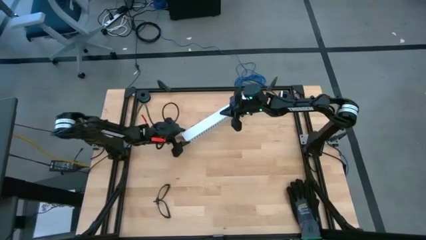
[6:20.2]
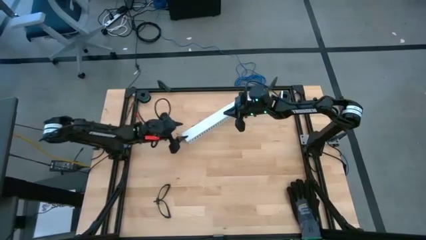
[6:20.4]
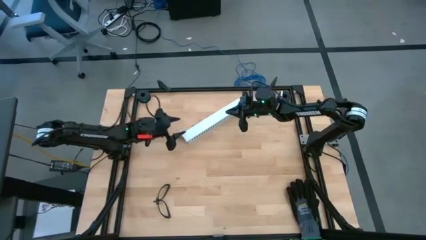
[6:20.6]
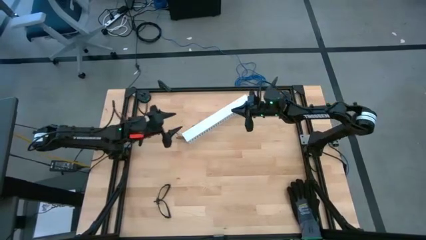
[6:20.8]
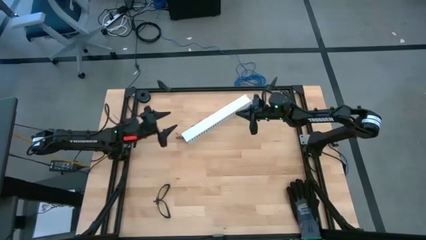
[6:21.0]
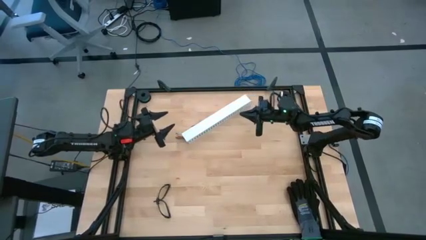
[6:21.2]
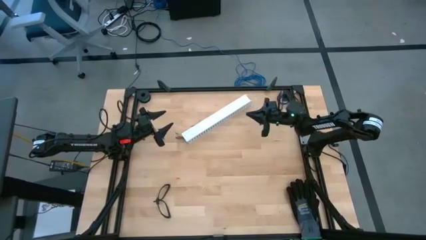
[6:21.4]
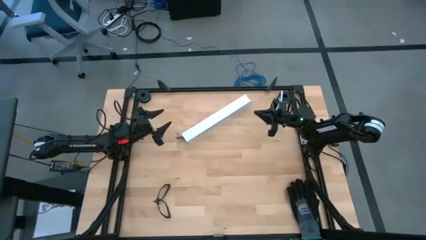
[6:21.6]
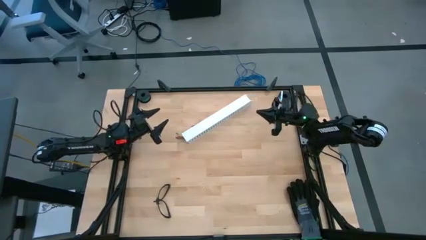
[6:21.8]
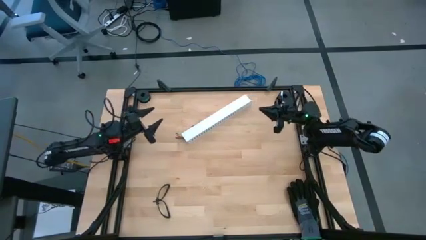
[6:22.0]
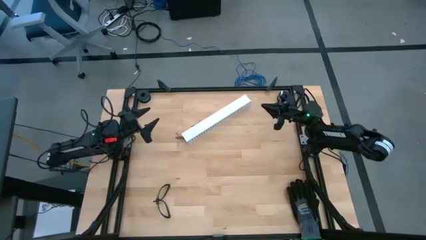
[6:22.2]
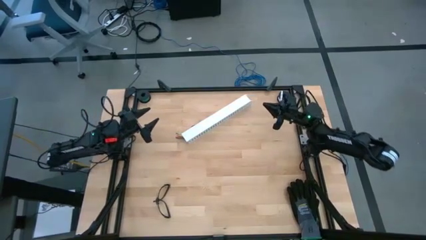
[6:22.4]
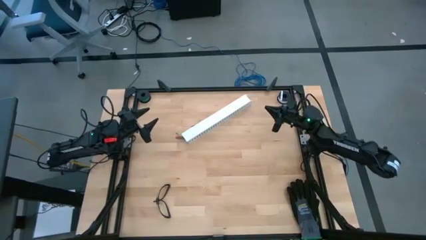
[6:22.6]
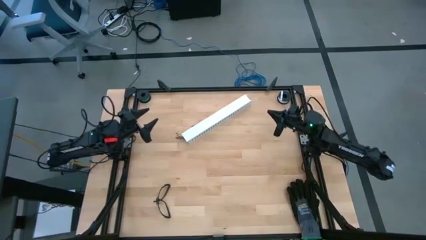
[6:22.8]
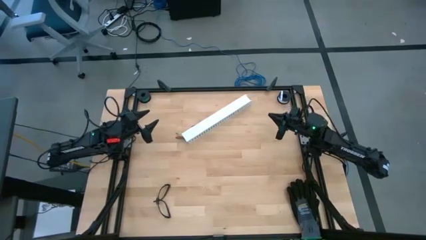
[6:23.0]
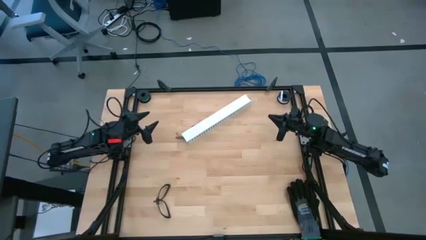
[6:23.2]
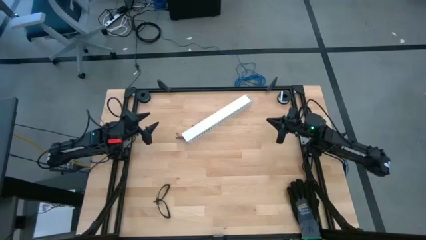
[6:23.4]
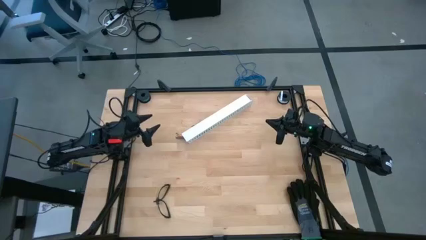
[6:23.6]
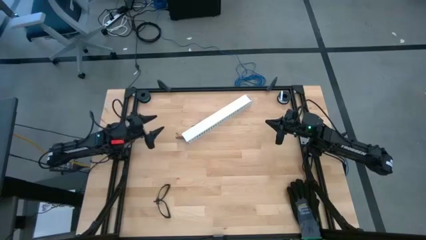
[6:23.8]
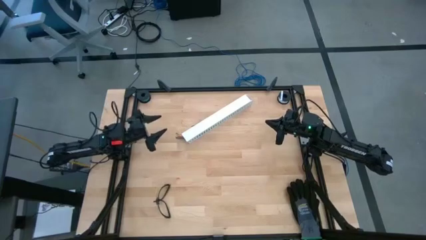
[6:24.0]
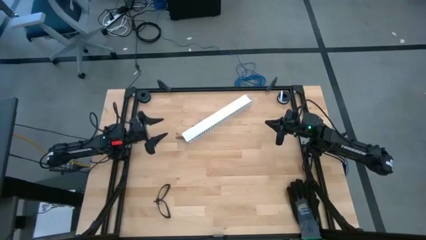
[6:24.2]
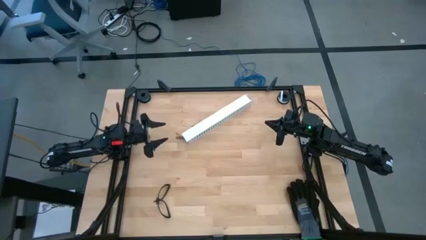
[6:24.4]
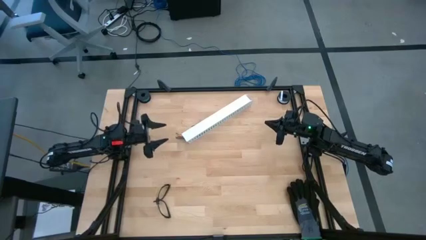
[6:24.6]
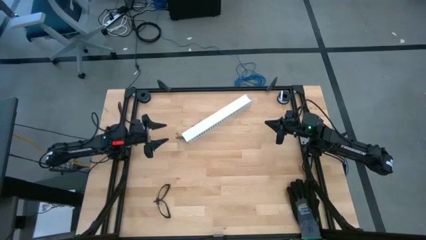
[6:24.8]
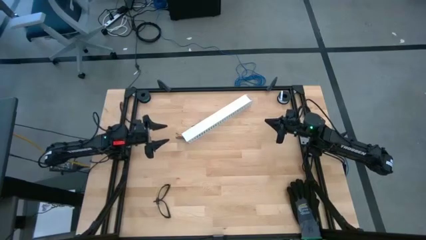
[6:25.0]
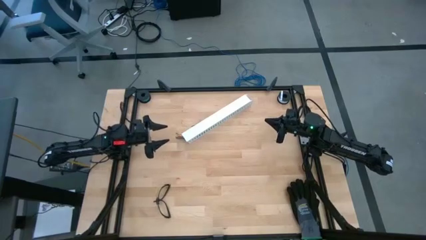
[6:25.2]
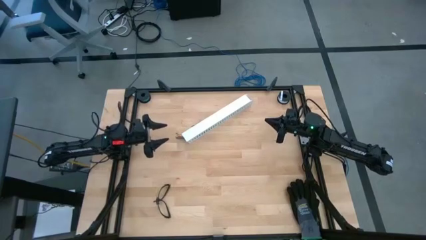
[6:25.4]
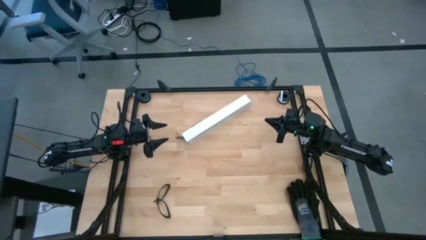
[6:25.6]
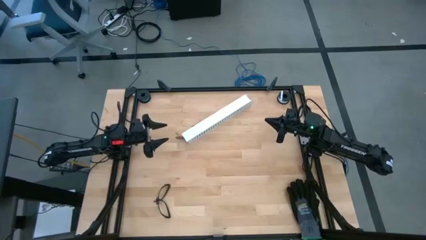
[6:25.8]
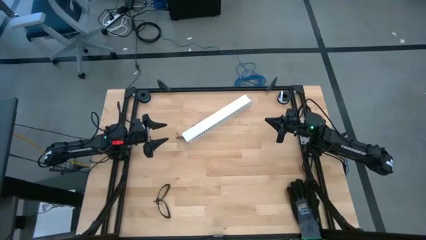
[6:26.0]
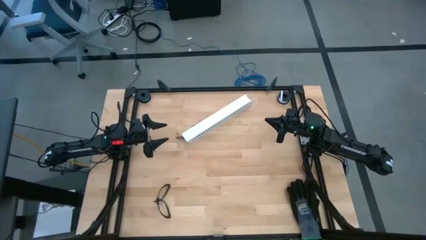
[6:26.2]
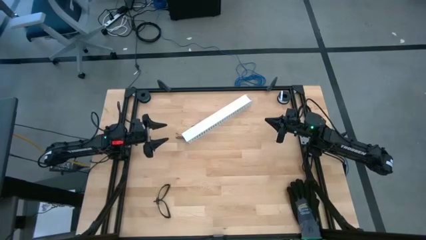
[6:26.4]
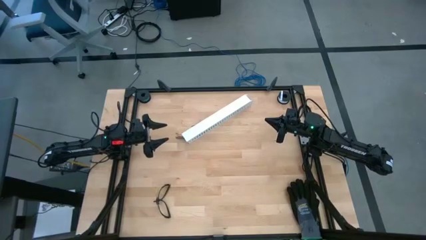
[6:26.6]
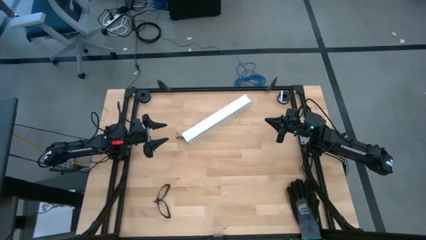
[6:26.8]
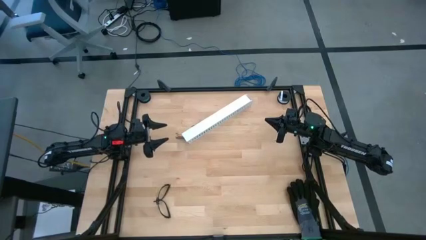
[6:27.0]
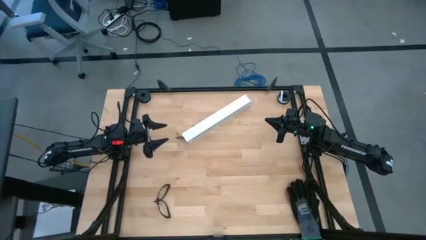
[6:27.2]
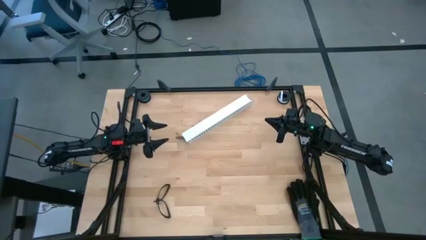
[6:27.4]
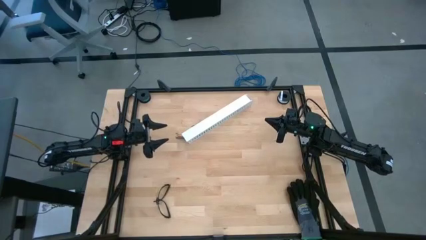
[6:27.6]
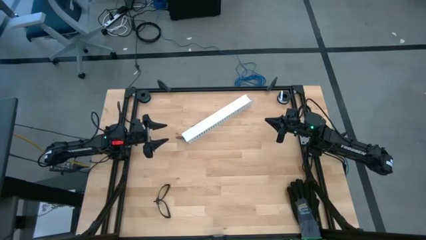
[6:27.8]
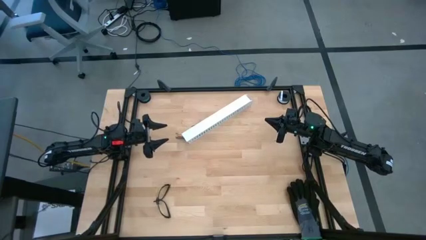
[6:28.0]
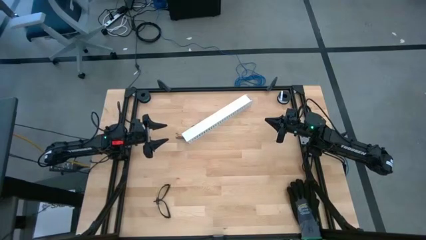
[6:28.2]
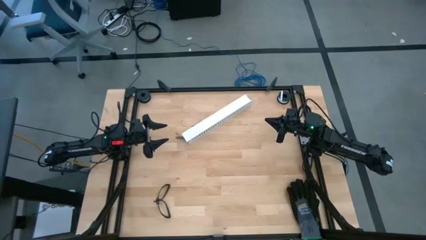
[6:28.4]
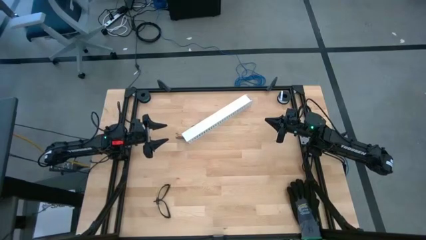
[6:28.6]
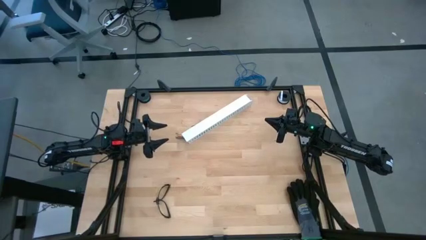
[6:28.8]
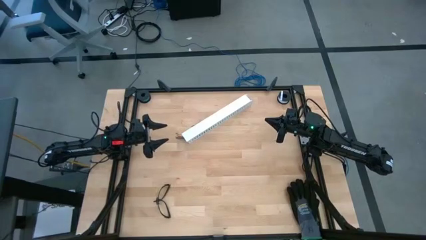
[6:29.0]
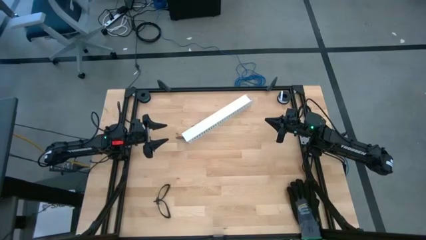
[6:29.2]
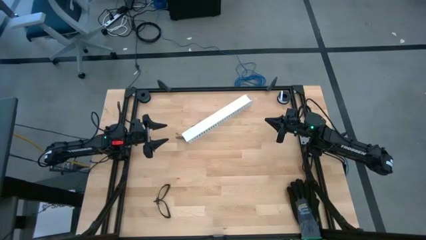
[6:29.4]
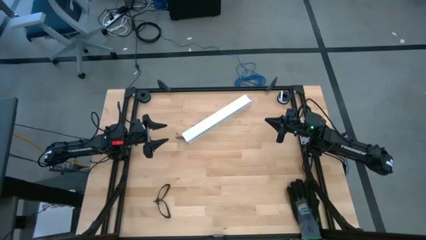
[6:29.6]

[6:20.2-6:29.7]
Task: Ziptie cables
Return to Home Position

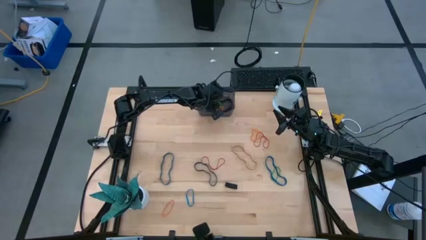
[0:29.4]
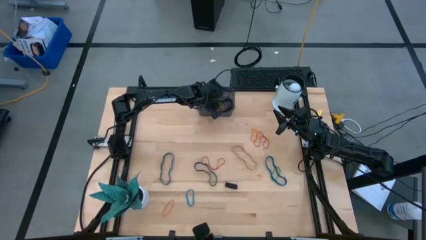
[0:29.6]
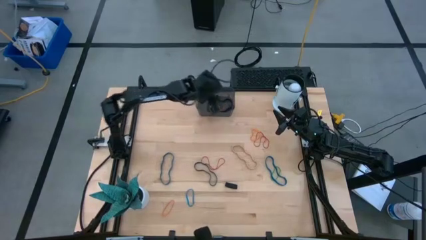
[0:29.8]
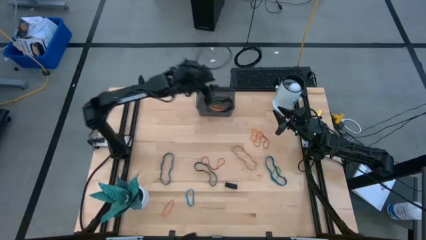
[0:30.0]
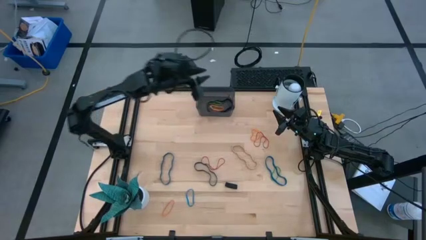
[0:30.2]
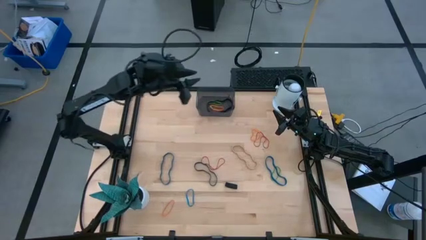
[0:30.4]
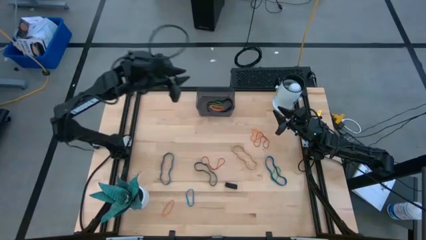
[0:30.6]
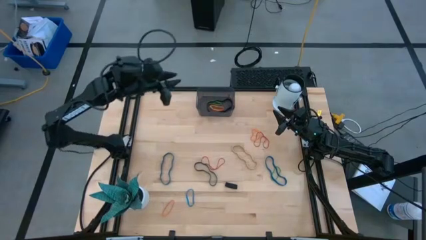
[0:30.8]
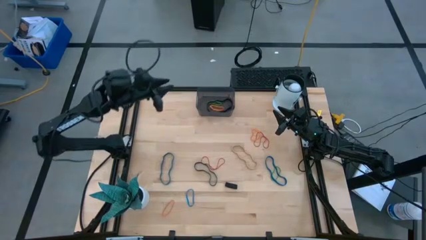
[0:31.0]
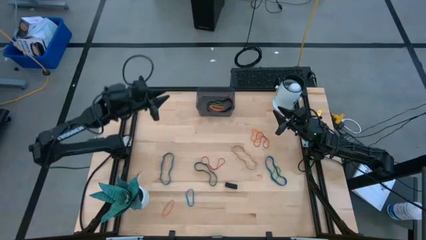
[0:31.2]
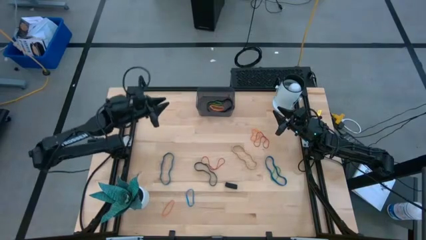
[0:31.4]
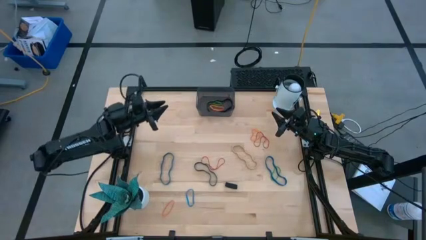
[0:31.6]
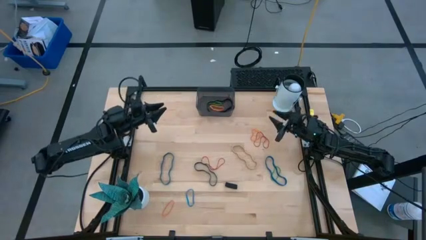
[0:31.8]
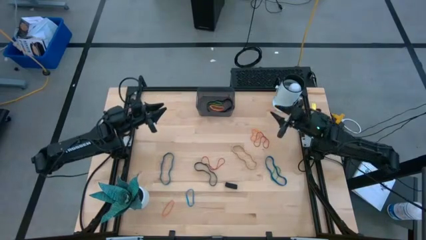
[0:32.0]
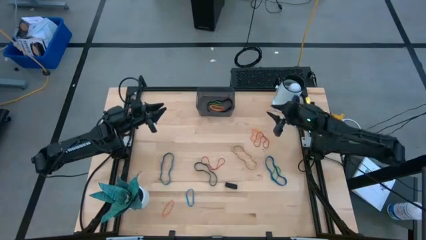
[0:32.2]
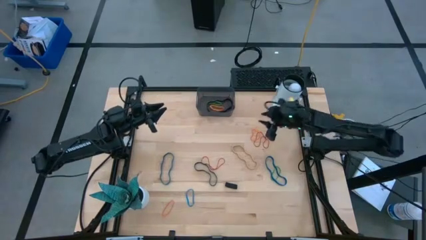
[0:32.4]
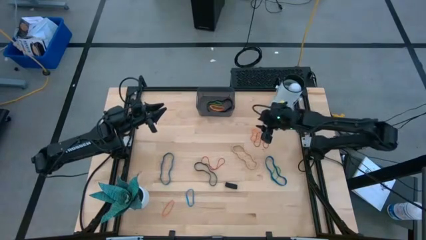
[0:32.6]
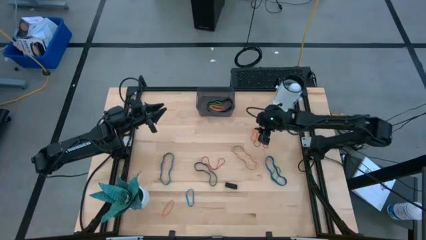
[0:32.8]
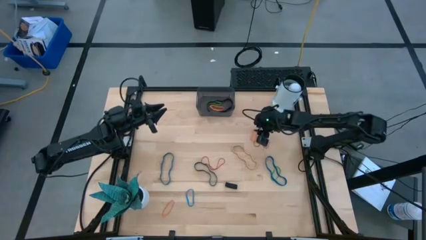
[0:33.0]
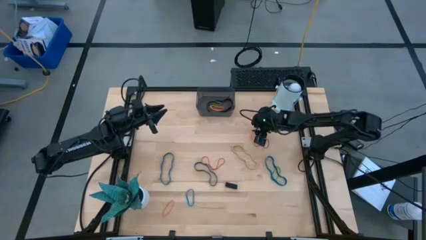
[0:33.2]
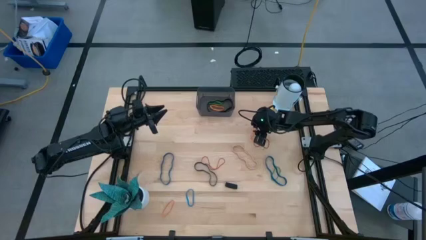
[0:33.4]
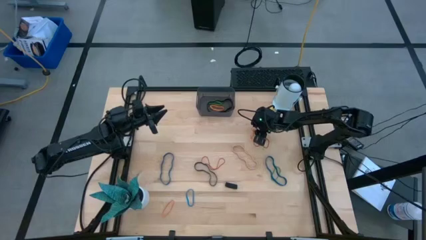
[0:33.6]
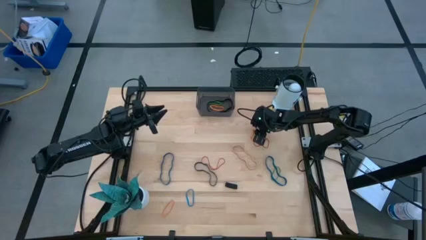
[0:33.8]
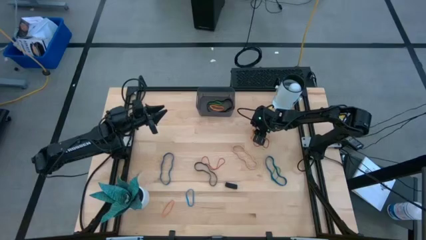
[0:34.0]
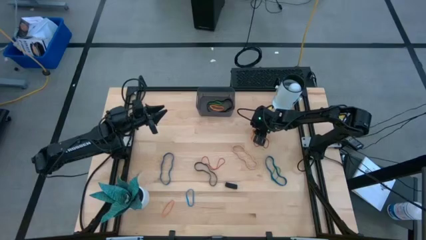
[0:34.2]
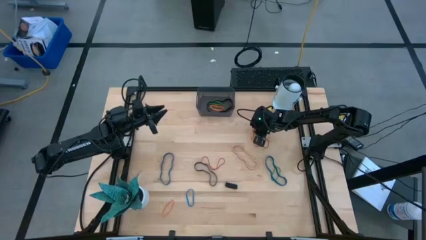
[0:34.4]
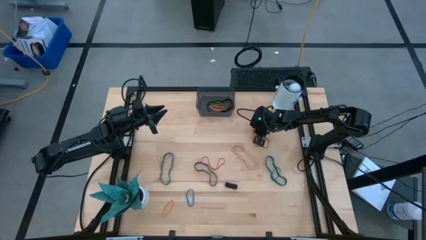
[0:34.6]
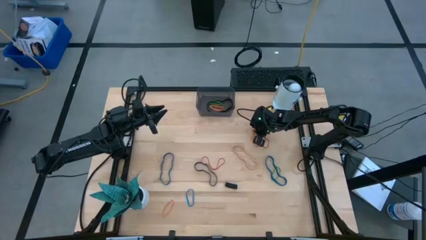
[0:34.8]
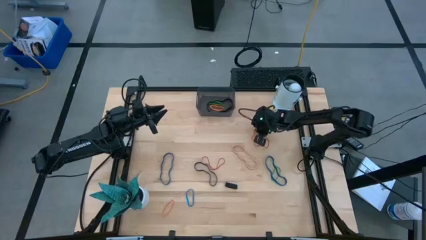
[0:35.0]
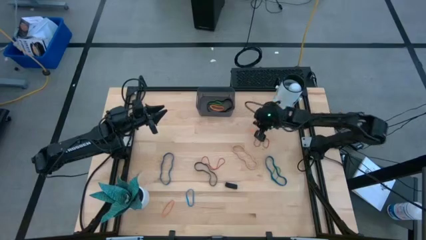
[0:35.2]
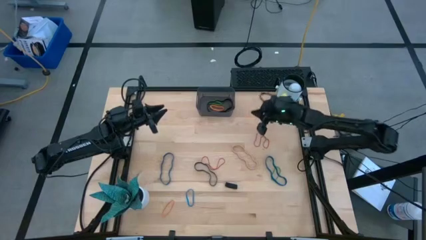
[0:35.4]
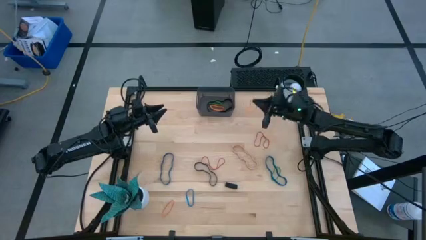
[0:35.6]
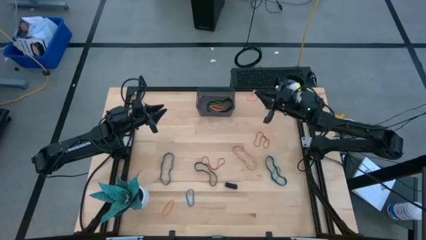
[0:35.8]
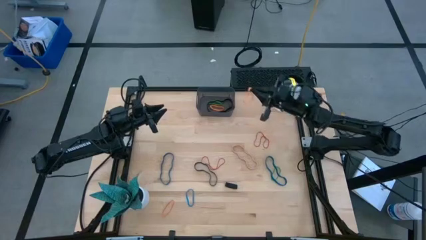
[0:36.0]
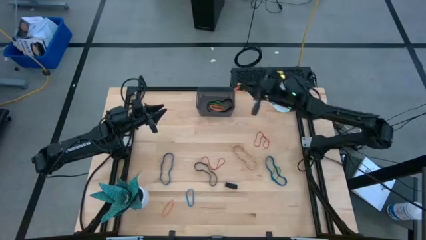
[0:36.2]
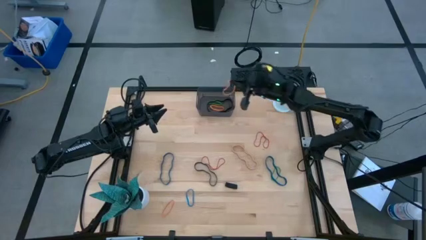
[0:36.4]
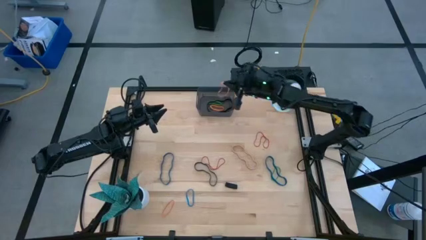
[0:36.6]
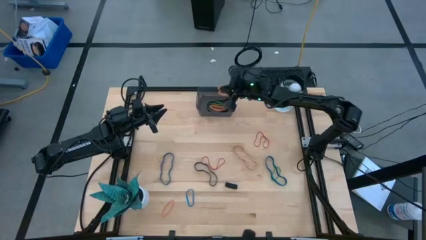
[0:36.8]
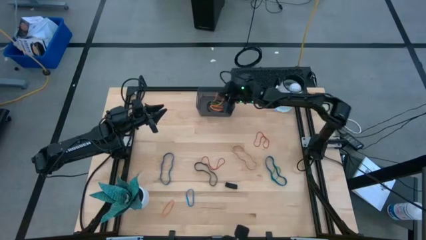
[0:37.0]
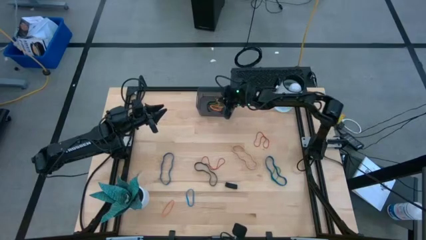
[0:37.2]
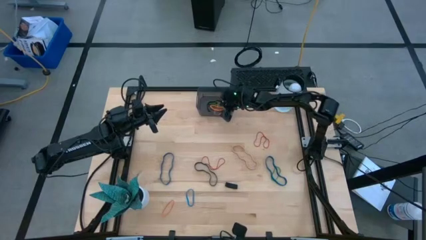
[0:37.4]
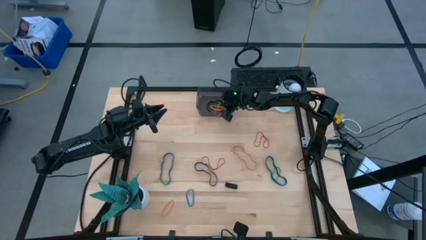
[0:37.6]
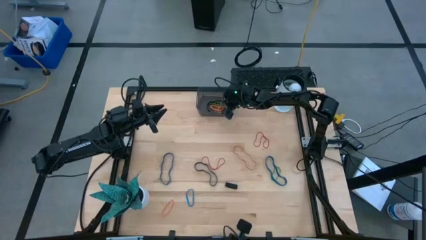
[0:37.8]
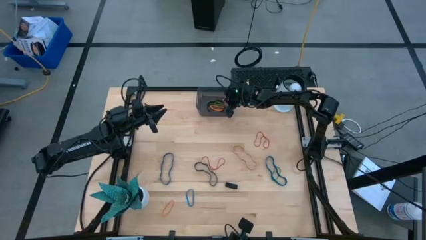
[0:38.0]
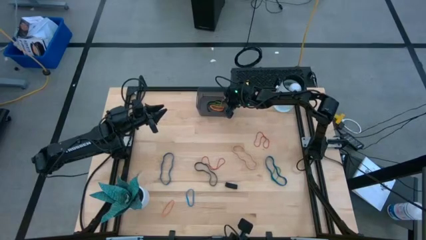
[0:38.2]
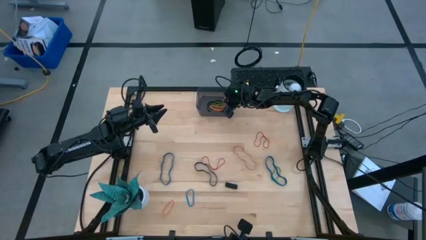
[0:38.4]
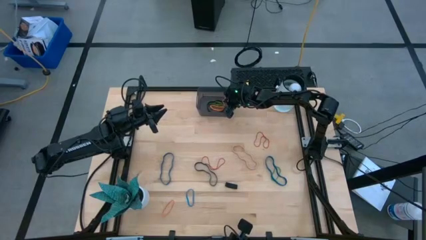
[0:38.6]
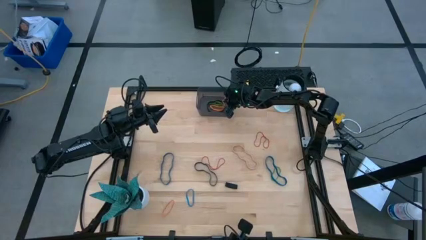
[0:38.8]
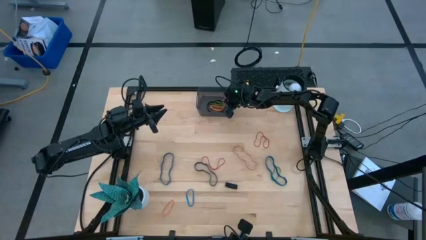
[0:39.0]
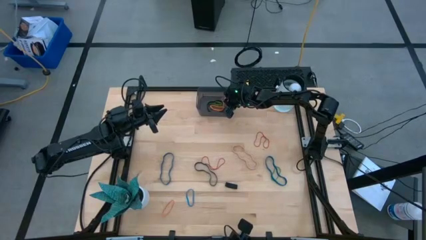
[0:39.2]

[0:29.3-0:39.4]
Task: Pick and place rubber bands into bin
Put the top orange rubber band into the black bin
